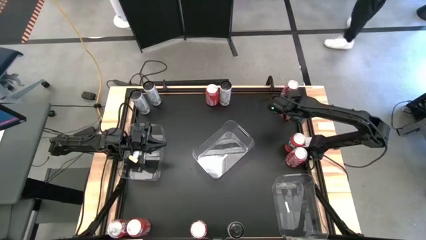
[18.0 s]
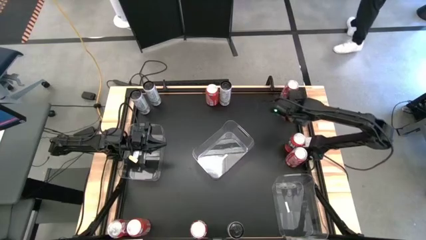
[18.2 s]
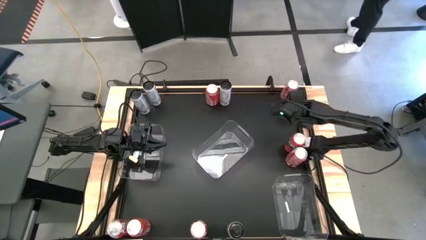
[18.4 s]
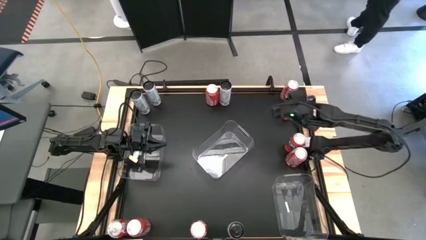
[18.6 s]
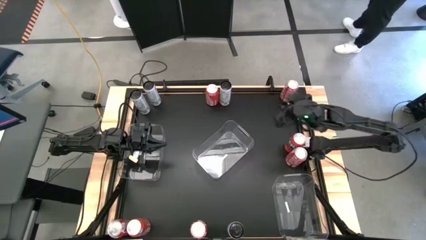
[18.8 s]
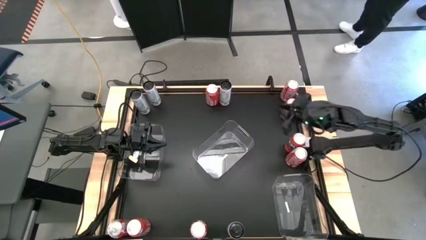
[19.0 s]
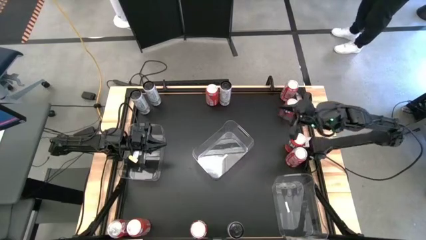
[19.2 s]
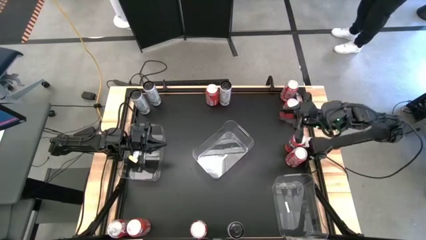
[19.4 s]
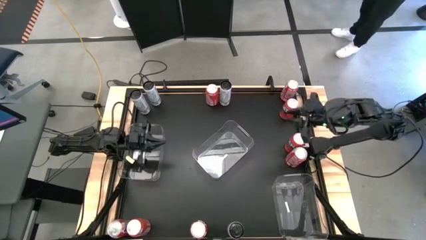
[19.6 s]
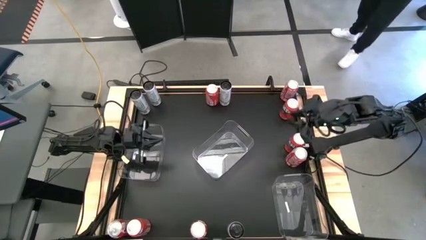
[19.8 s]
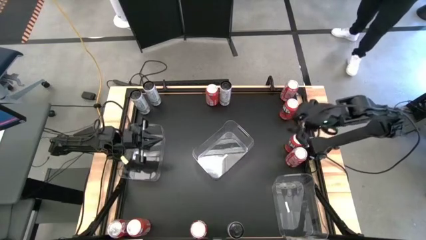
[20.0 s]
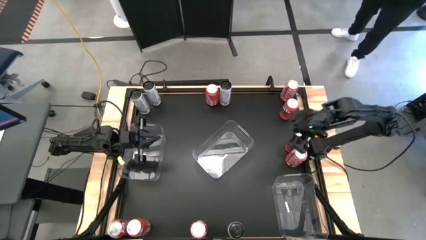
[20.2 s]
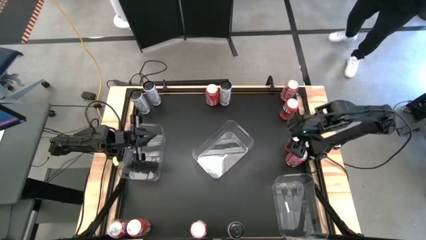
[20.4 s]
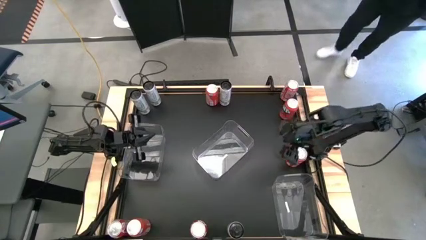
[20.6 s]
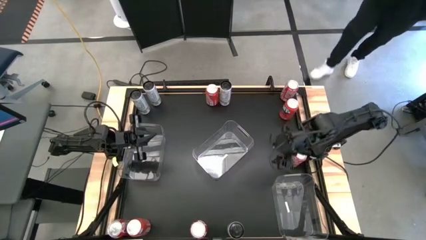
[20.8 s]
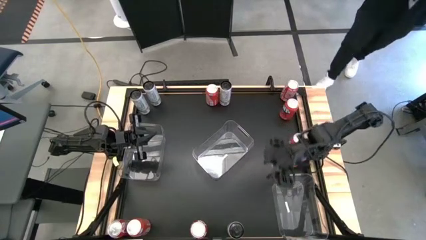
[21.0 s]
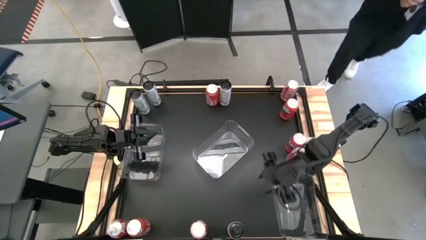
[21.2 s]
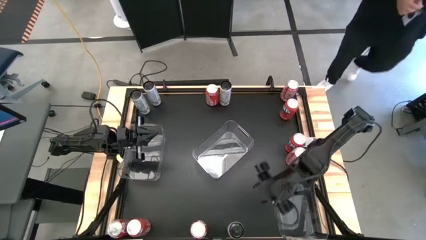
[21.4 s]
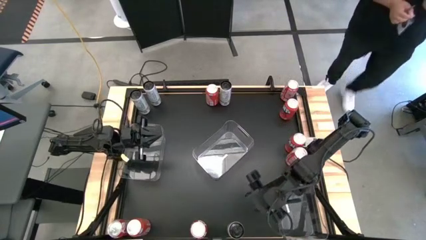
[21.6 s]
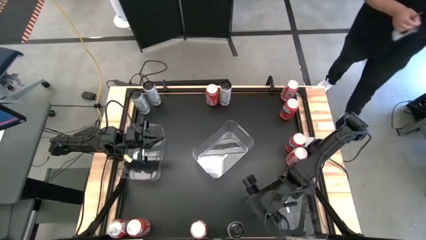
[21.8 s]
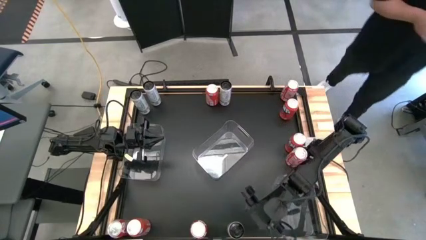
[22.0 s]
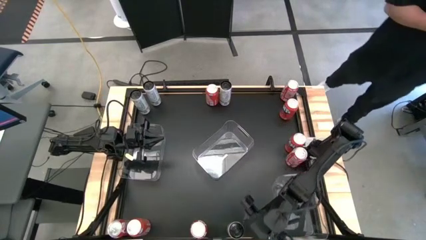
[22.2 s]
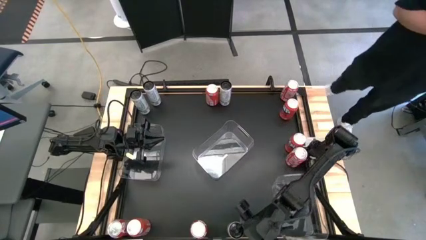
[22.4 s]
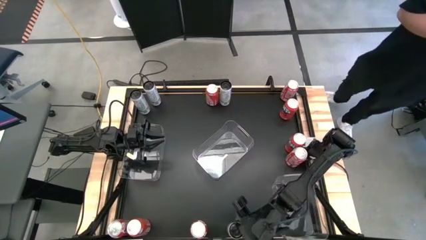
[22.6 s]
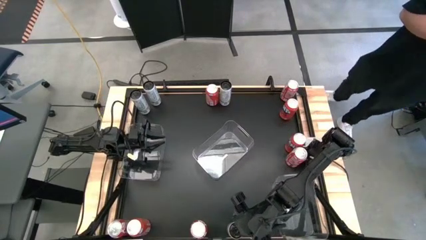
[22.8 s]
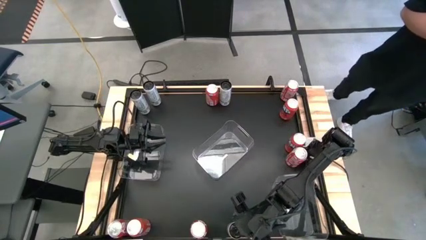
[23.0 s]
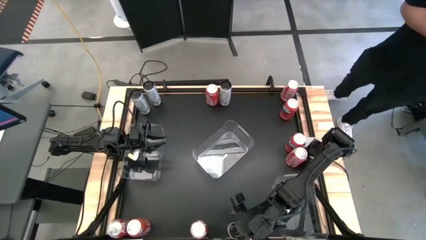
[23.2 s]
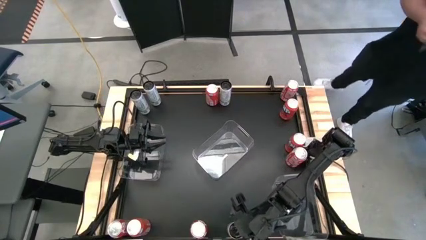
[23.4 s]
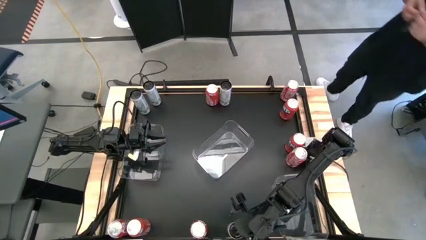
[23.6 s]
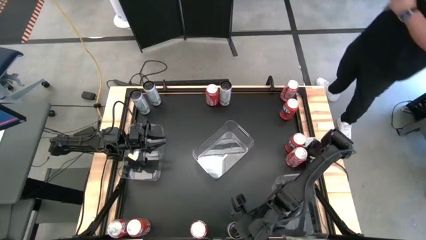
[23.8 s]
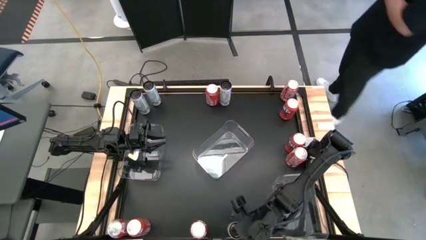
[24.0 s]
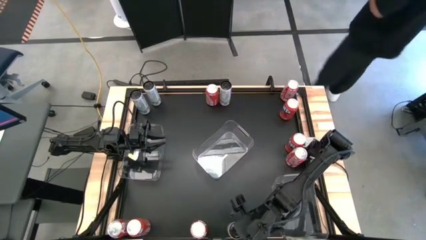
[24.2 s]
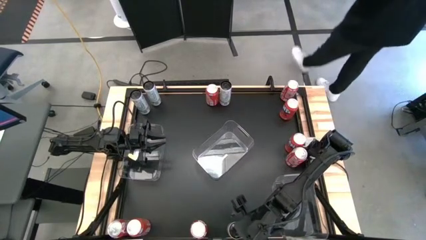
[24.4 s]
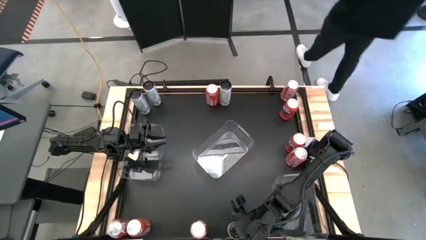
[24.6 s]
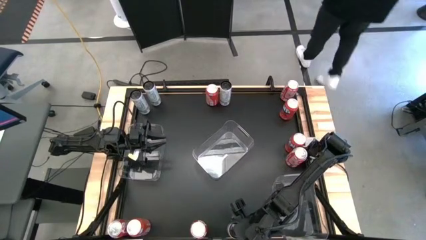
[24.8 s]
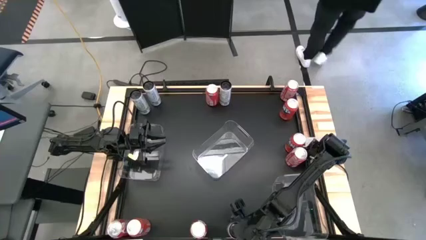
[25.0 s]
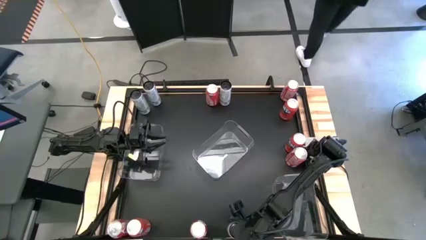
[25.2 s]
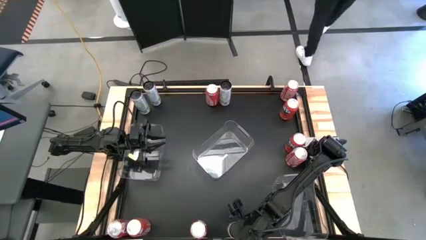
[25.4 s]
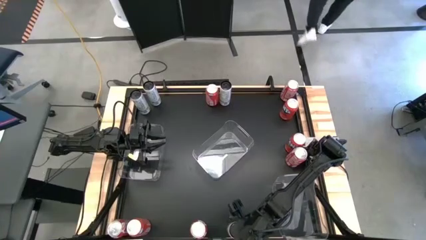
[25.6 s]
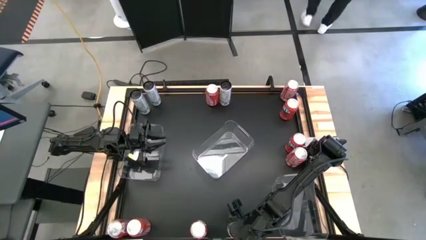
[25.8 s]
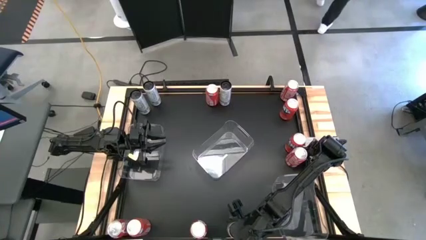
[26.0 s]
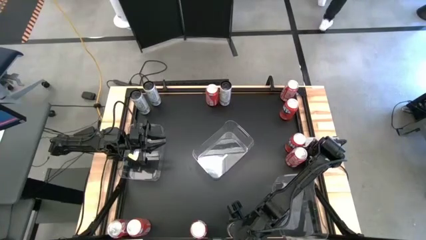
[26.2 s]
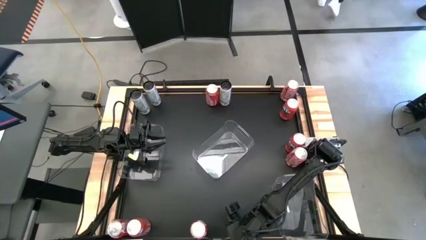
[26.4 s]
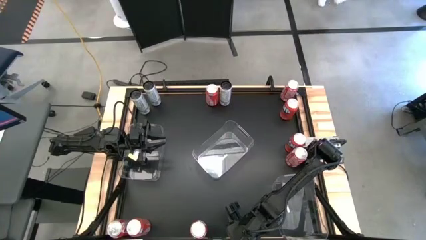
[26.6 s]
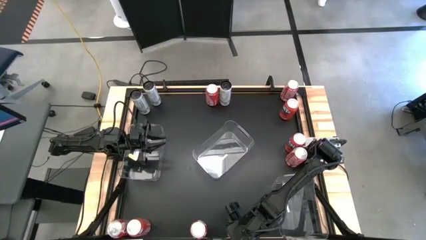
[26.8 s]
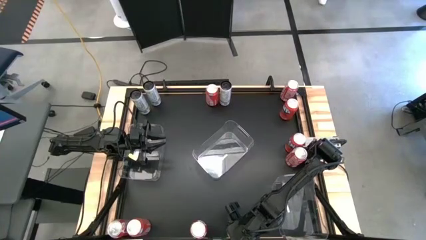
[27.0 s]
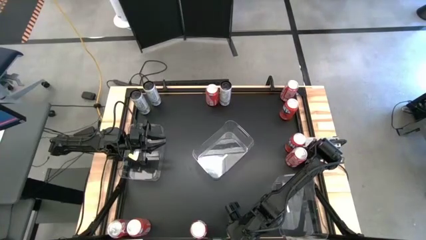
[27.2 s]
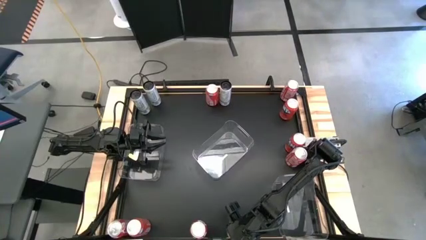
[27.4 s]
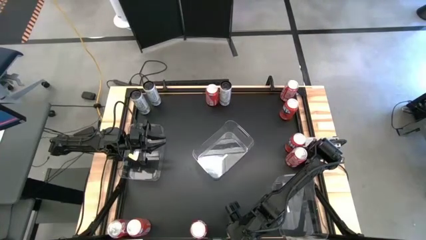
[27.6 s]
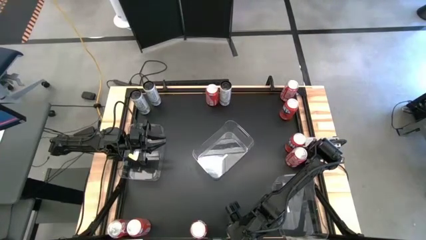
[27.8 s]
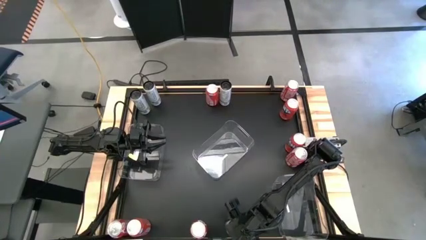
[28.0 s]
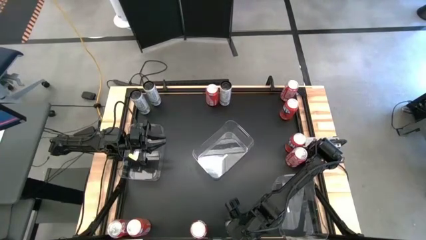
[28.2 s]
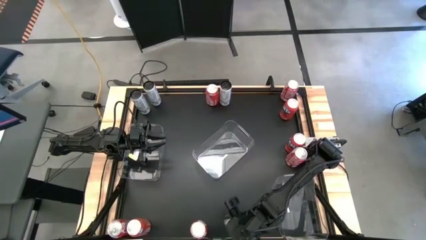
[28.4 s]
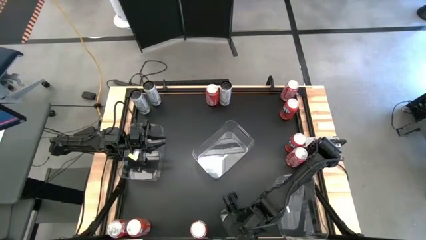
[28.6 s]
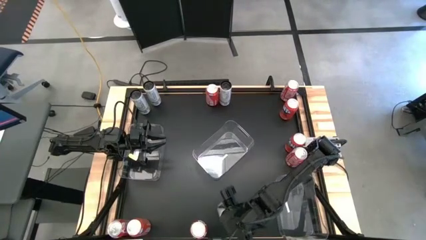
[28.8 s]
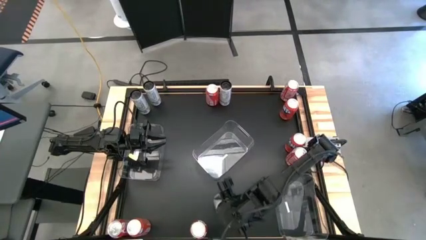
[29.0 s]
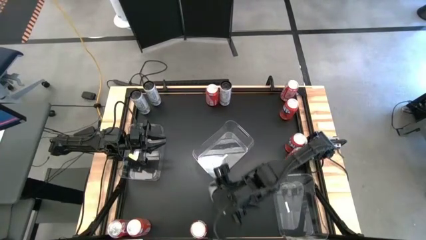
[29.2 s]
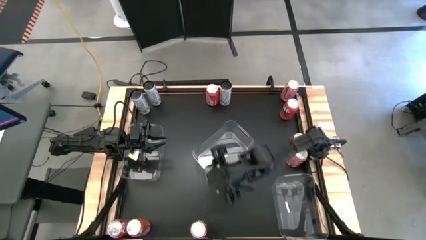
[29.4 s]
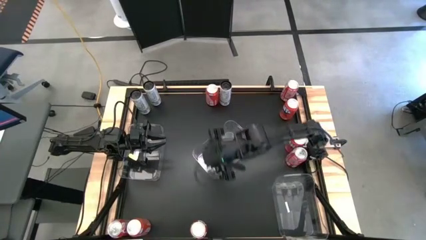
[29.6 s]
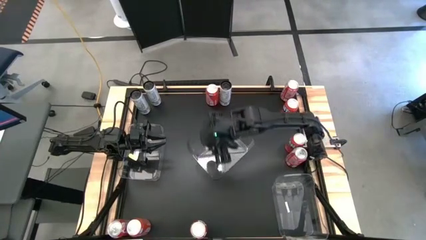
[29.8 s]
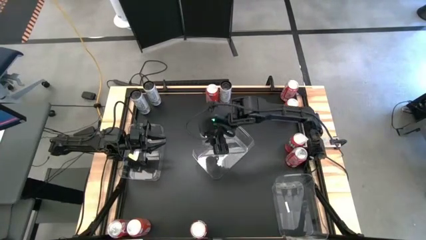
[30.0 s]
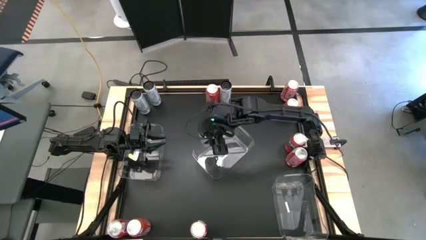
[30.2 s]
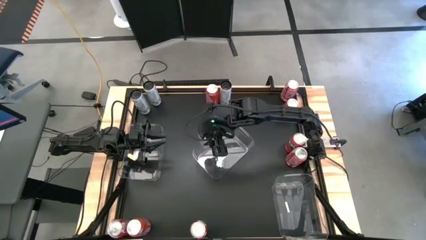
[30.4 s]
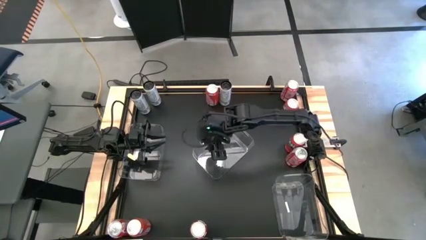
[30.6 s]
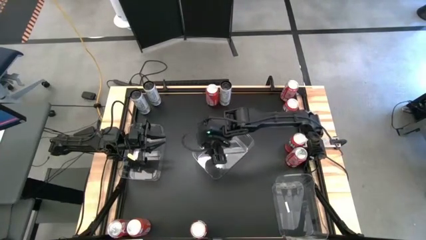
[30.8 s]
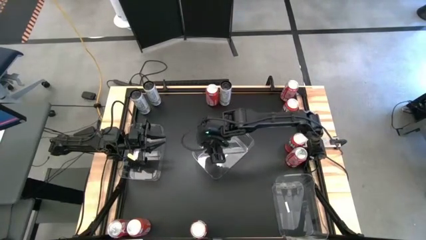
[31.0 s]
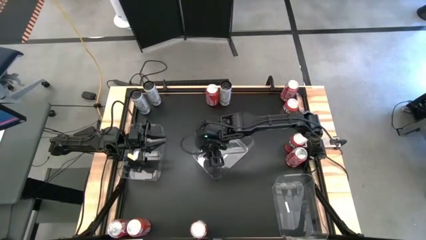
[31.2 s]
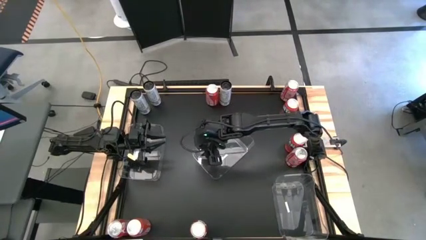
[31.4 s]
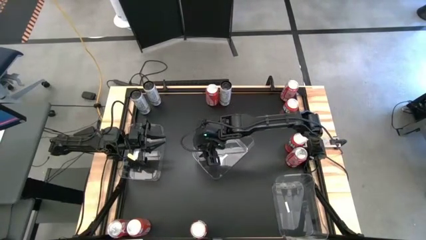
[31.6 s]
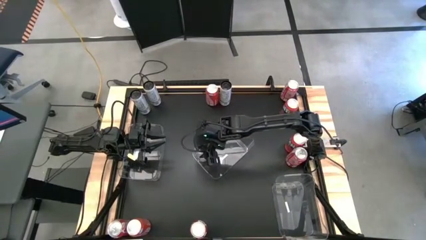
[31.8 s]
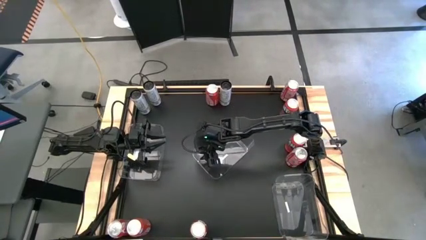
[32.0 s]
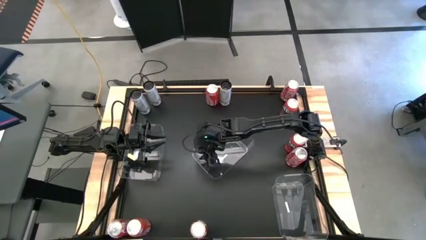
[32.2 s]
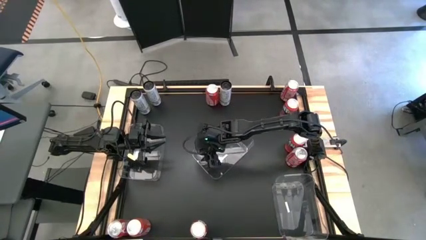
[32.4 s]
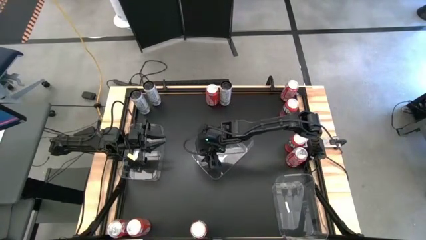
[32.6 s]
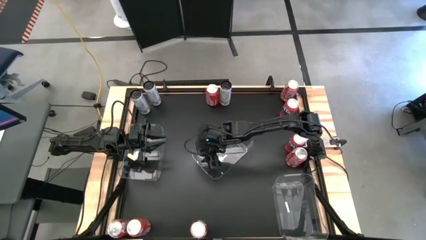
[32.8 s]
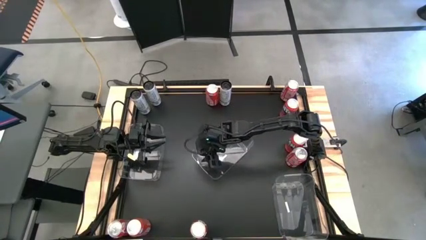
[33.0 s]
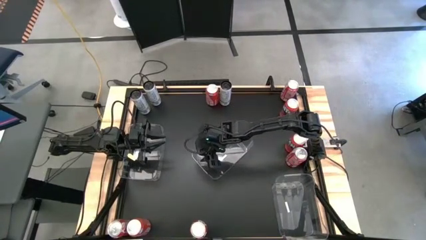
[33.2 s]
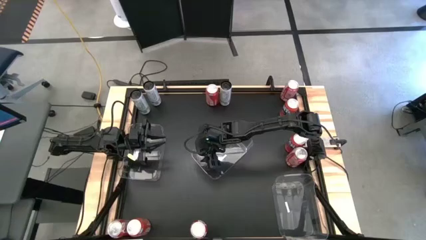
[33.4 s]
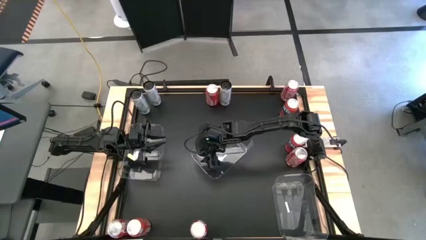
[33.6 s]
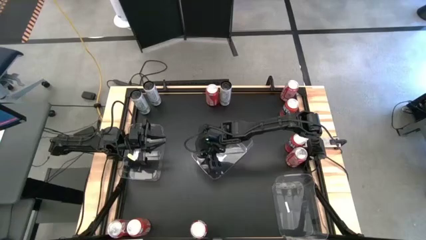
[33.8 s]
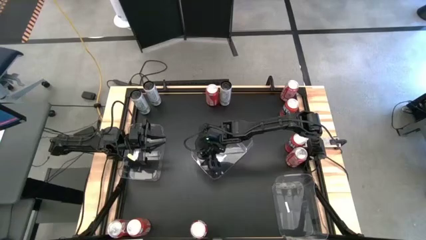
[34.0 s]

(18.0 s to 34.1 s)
Task: Sort soda cans
Put the white soda can into the middle transparent bin
